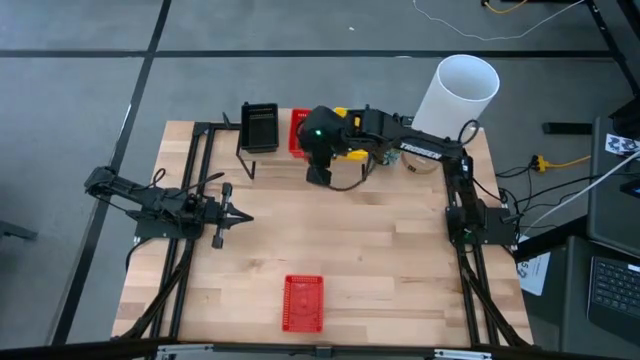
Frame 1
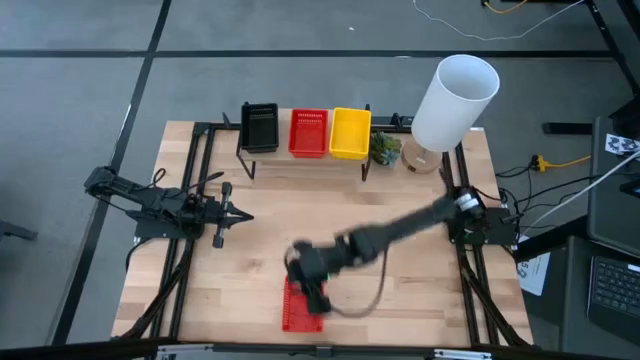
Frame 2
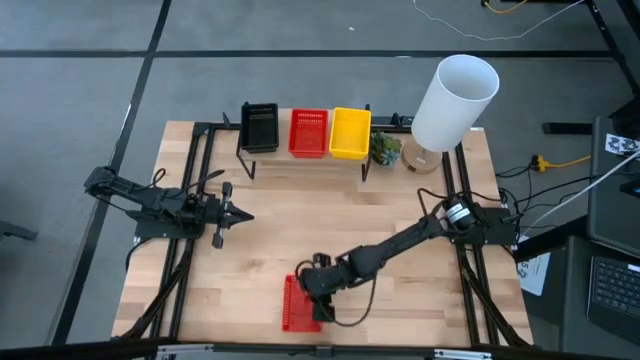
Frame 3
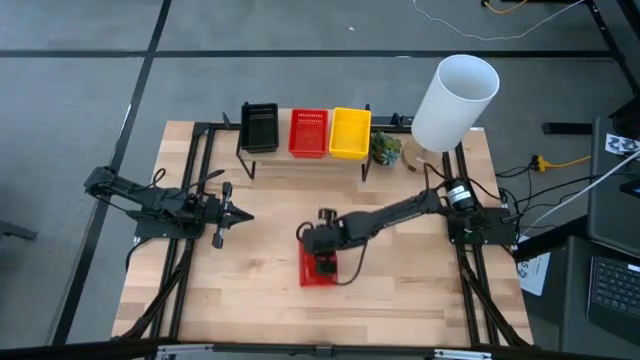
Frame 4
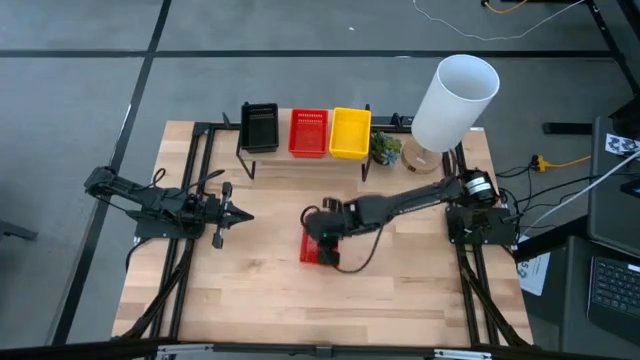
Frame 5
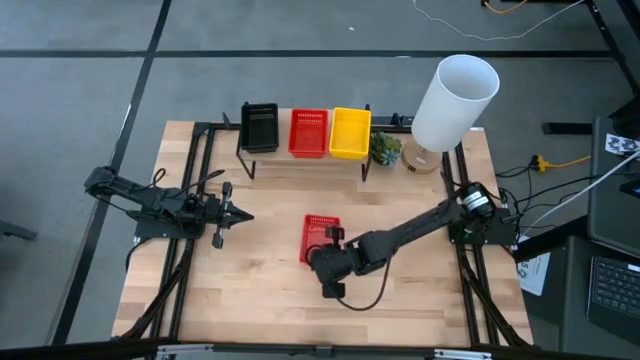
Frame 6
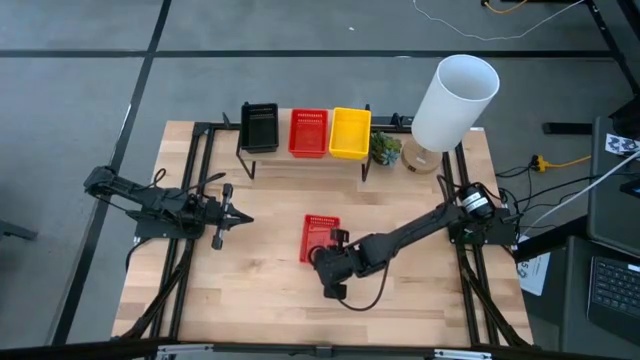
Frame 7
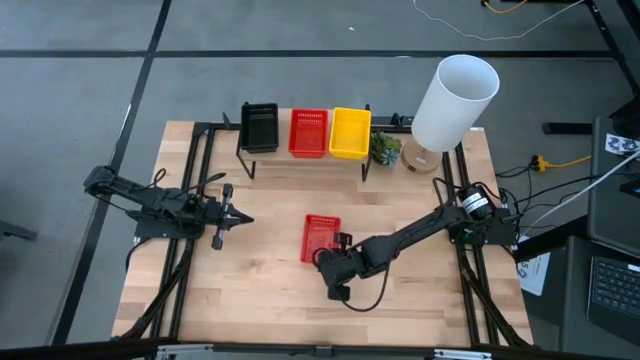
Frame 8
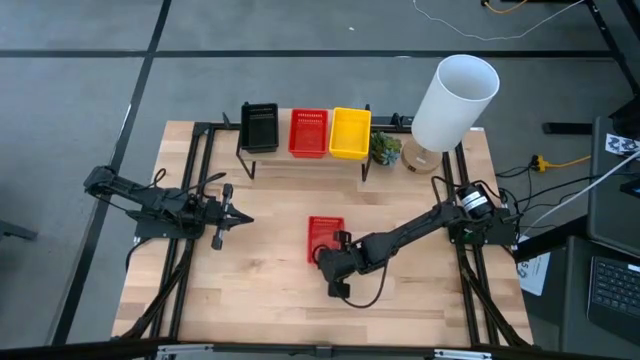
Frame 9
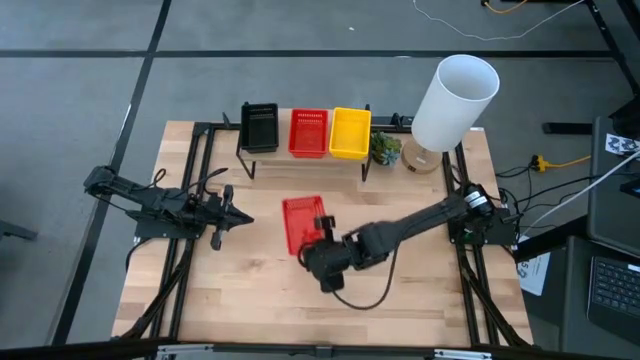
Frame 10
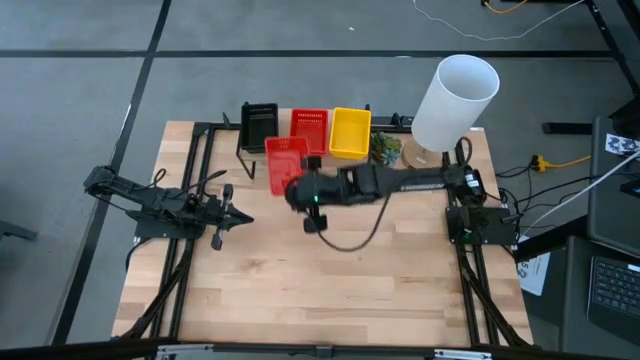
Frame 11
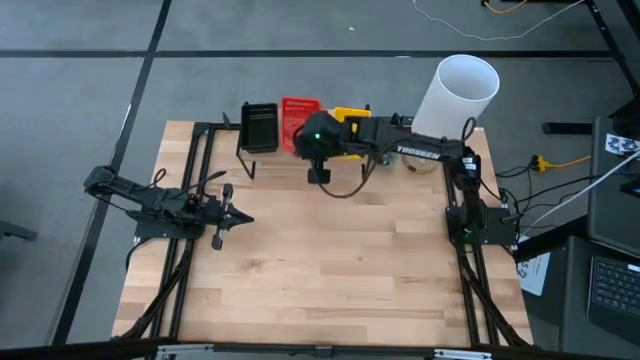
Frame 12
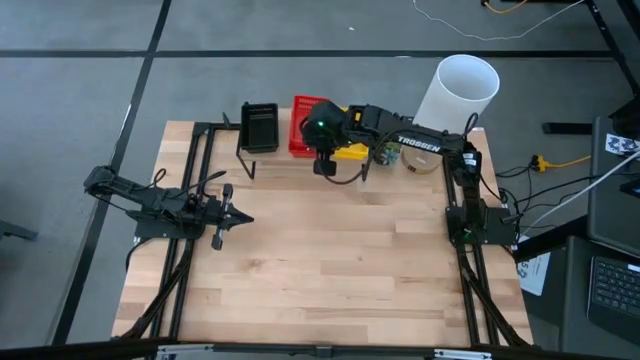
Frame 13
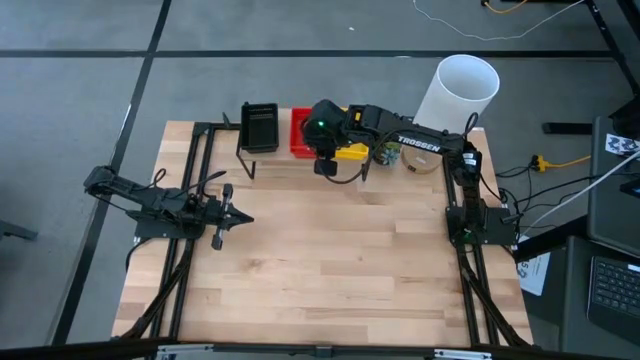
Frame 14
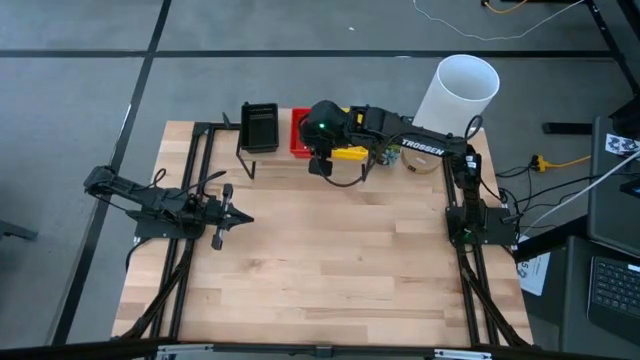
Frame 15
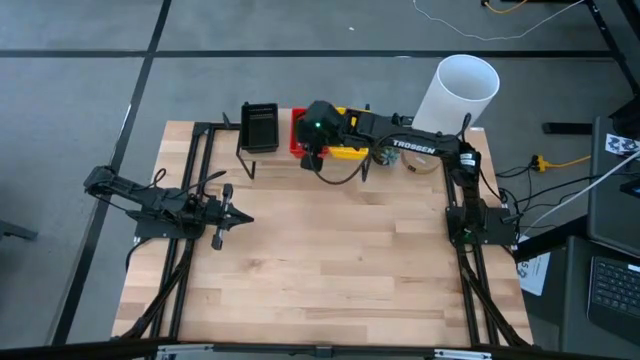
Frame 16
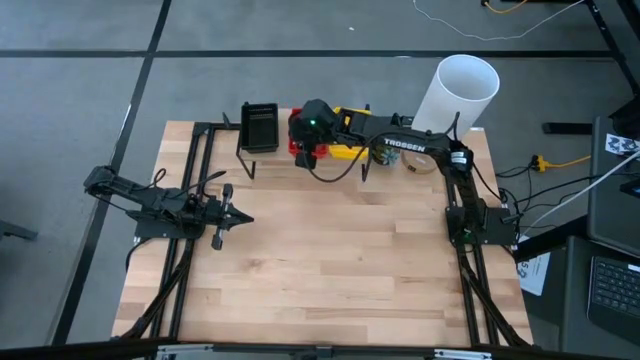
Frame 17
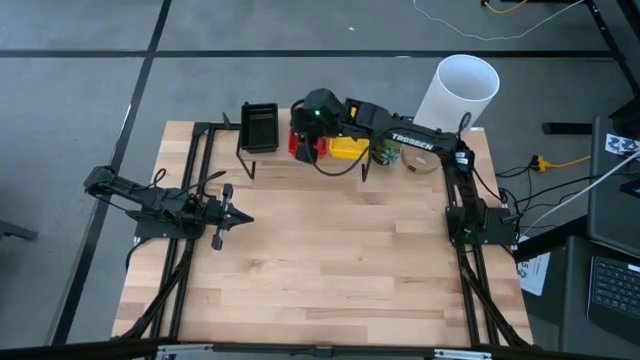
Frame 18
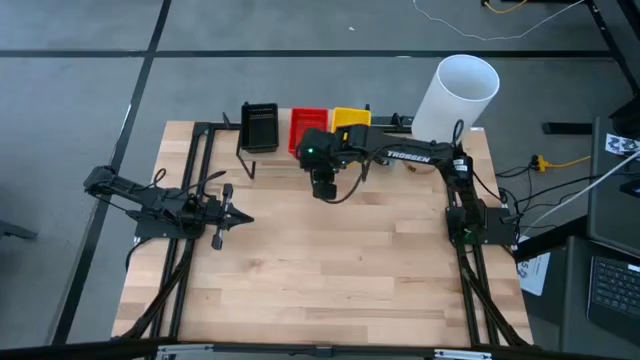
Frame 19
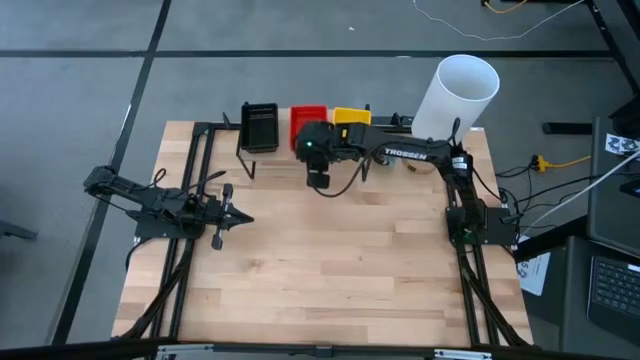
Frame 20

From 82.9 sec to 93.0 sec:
Task: Stack baskets on shelf by color
Stack the red bin on the other red bin on the shelf

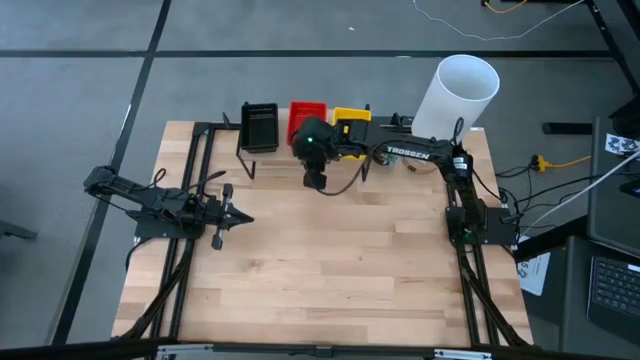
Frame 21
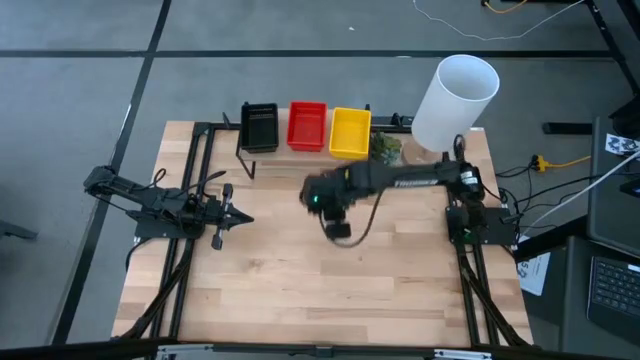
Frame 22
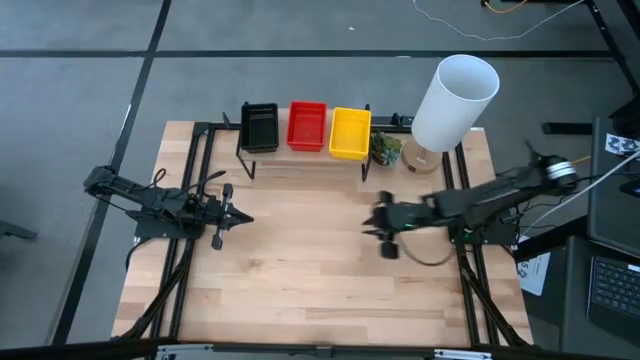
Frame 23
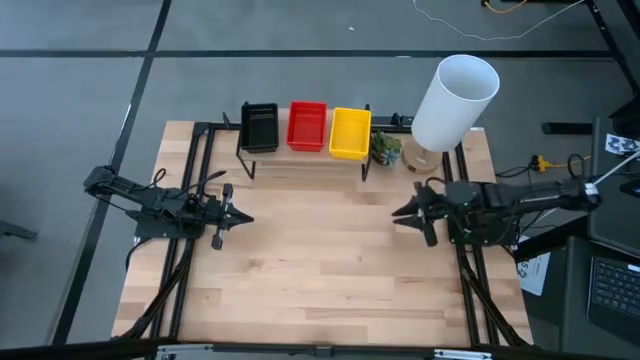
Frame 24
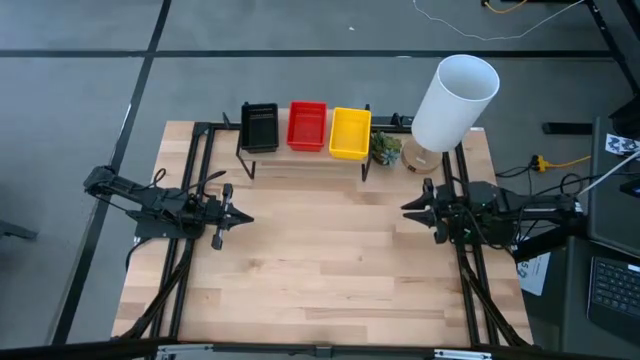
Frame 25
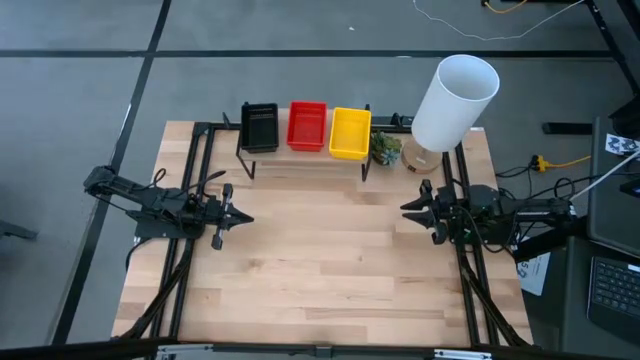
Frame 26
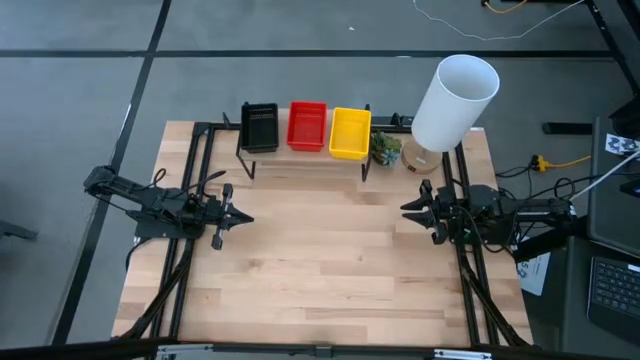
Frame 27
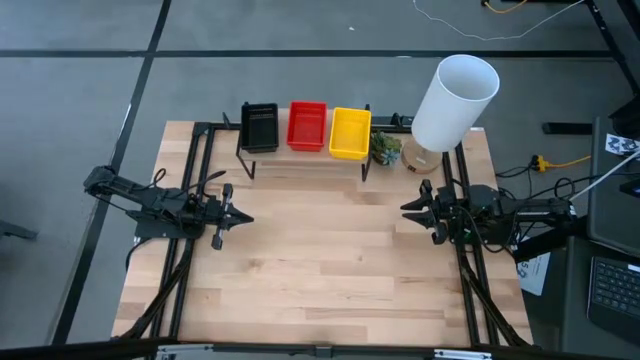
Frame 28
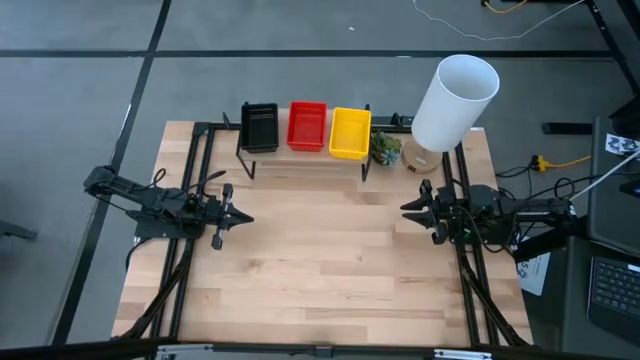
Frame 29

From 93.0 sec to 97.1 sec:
Return to Home Position

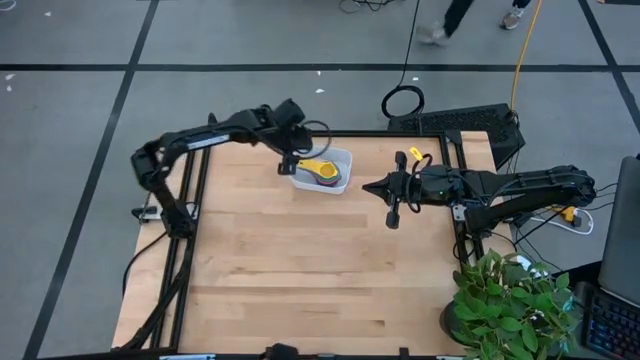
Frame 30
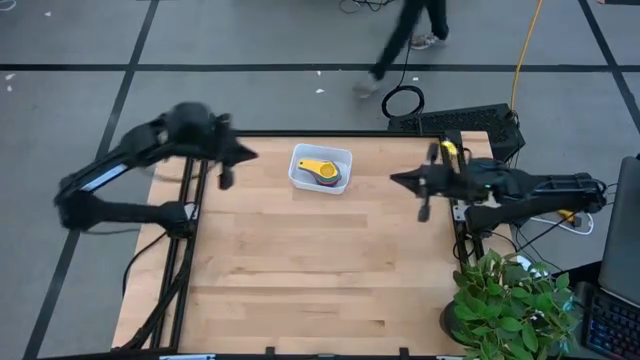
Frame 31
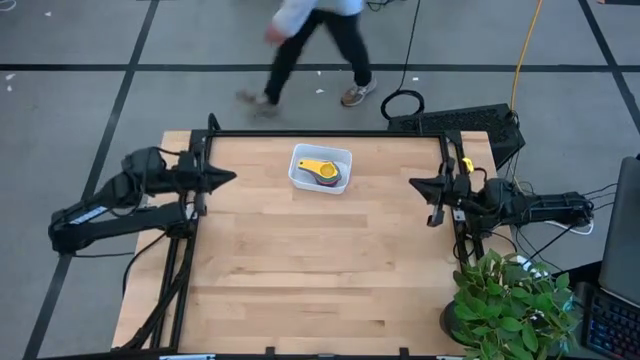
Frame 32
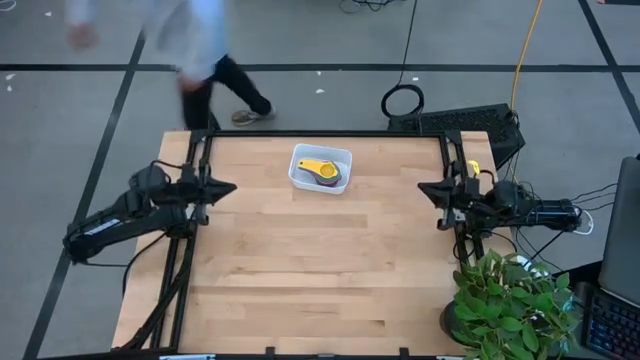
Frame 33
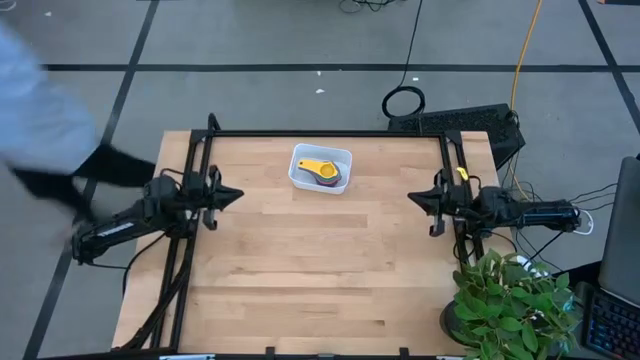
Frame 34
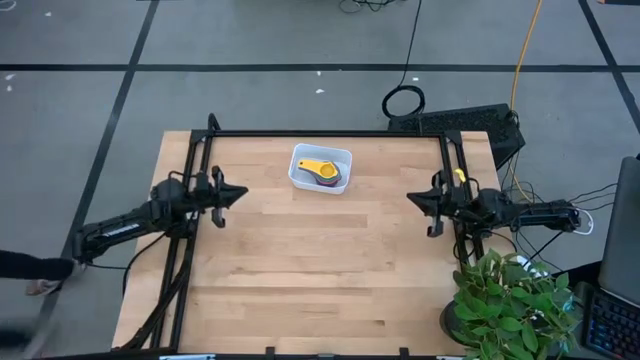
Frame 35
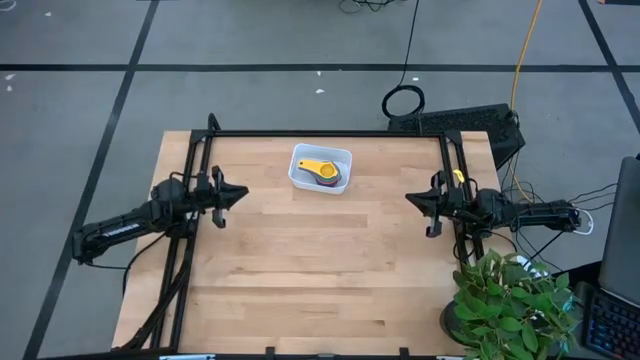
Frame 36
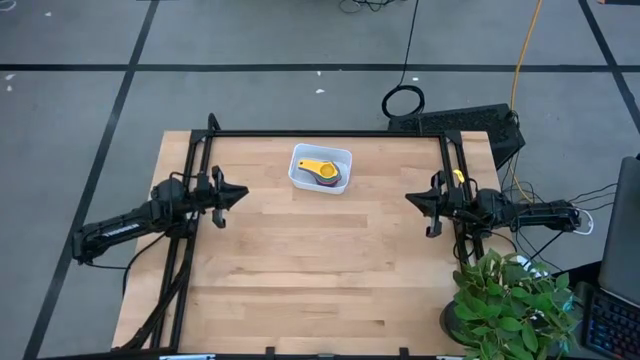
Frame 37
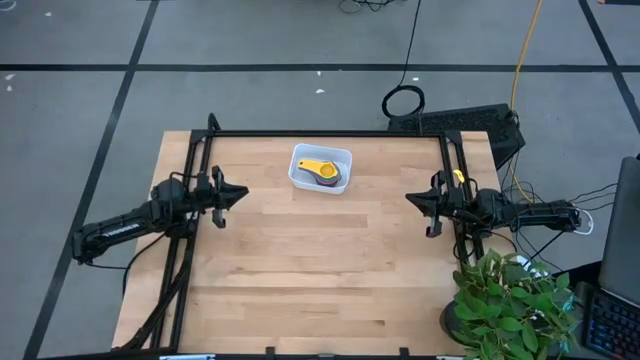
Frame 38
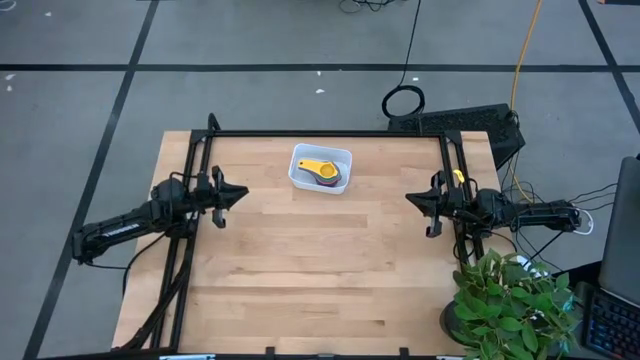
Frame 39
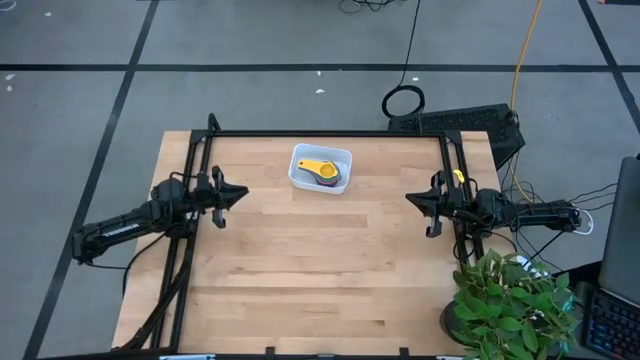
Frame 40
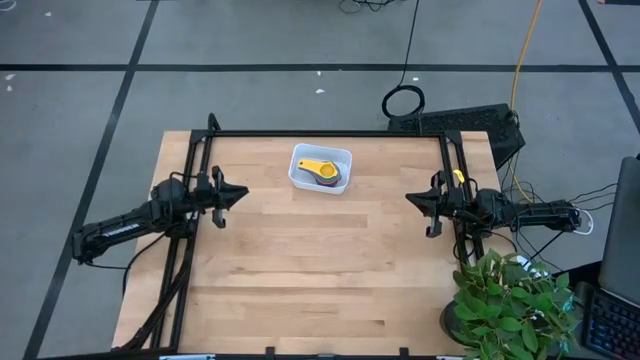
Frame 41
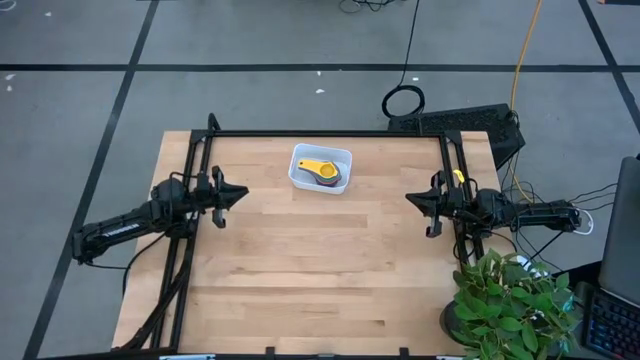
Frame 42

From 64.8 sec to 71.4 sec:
Task: Nest measuring cups in basket
Return to Home Position
